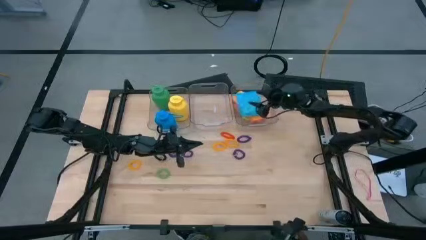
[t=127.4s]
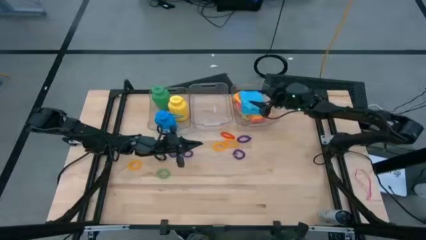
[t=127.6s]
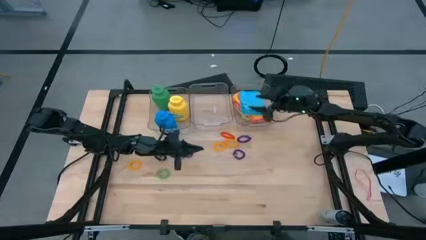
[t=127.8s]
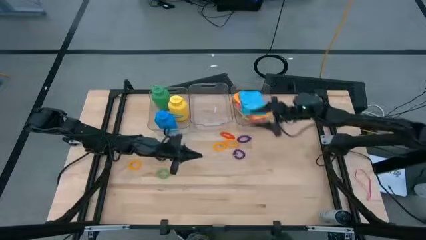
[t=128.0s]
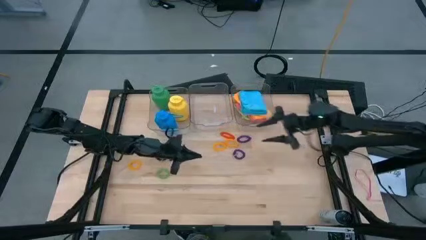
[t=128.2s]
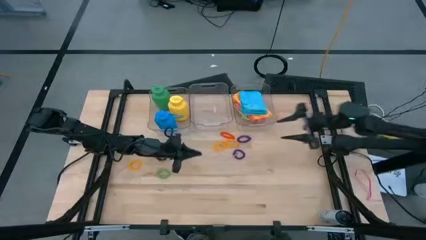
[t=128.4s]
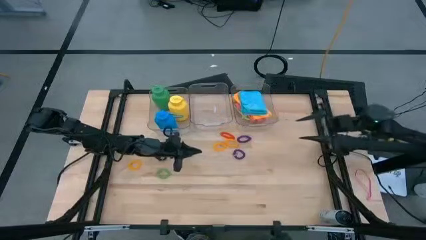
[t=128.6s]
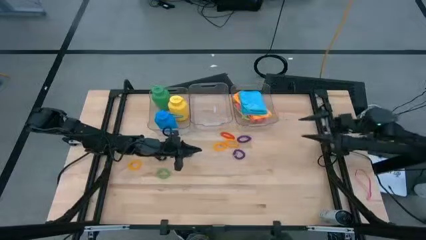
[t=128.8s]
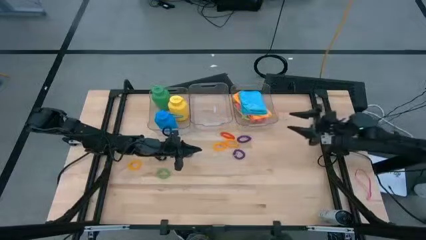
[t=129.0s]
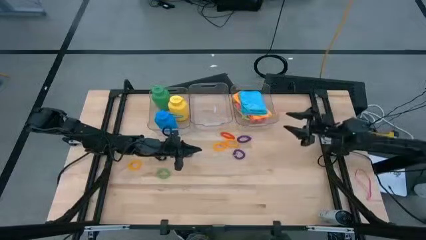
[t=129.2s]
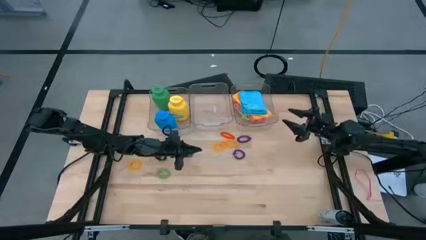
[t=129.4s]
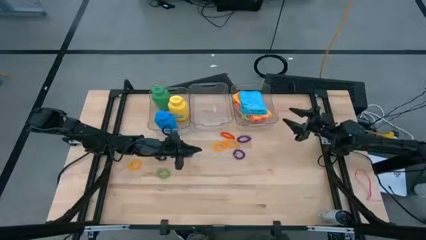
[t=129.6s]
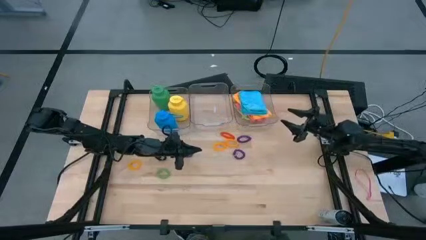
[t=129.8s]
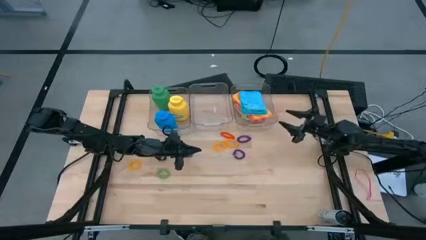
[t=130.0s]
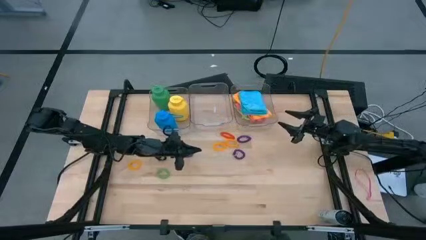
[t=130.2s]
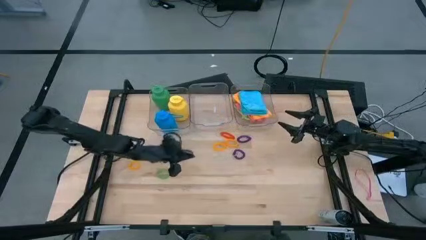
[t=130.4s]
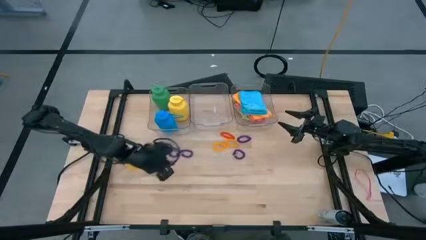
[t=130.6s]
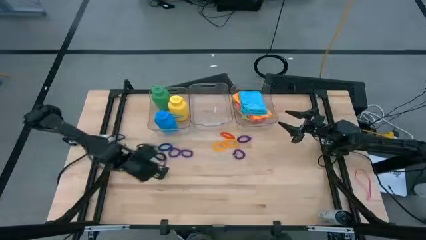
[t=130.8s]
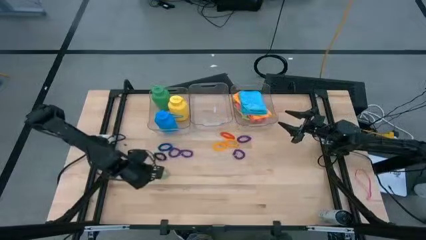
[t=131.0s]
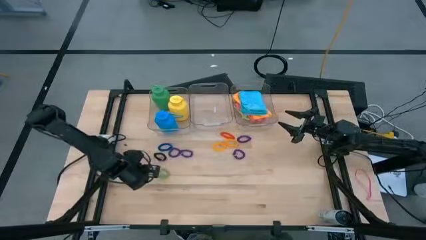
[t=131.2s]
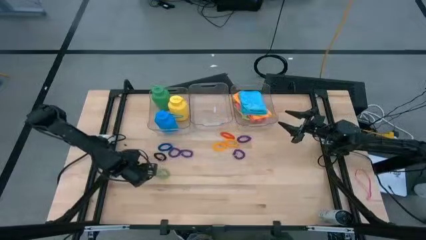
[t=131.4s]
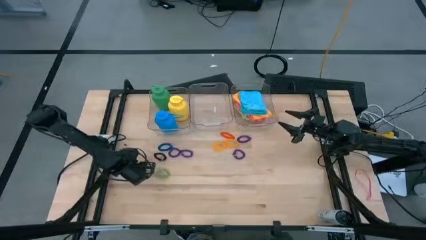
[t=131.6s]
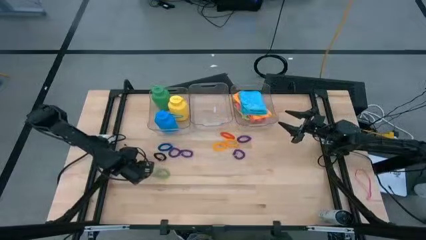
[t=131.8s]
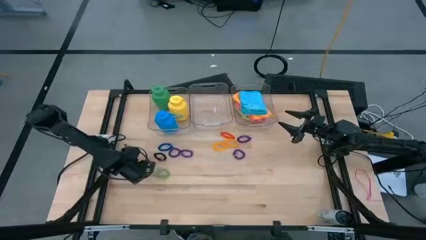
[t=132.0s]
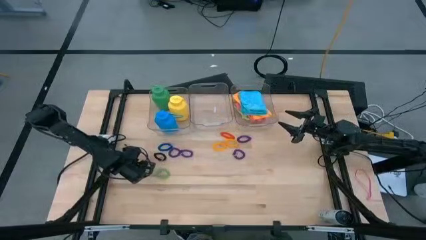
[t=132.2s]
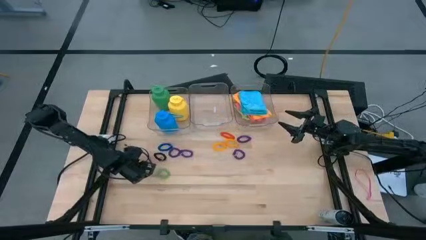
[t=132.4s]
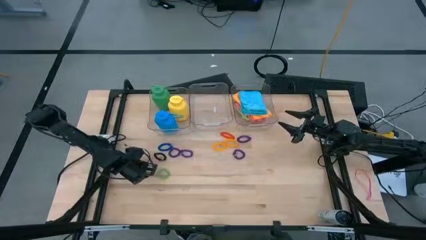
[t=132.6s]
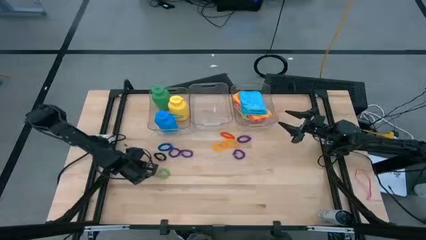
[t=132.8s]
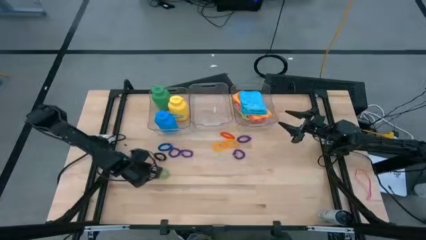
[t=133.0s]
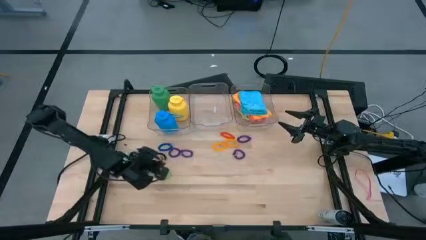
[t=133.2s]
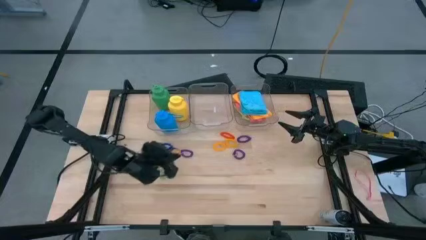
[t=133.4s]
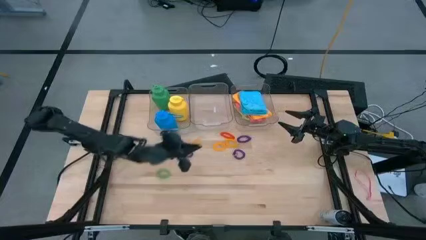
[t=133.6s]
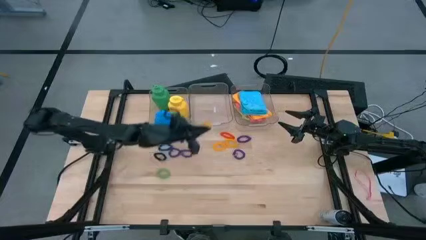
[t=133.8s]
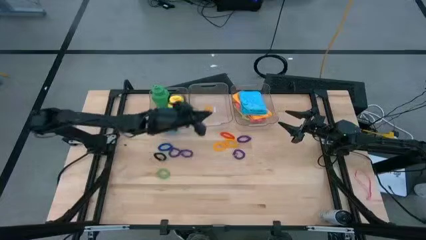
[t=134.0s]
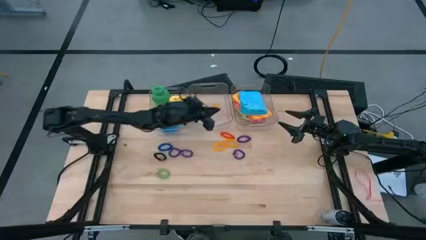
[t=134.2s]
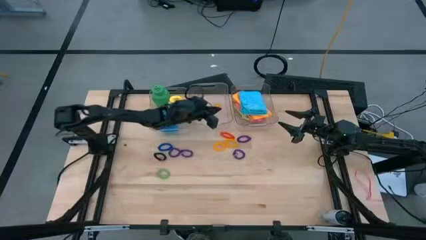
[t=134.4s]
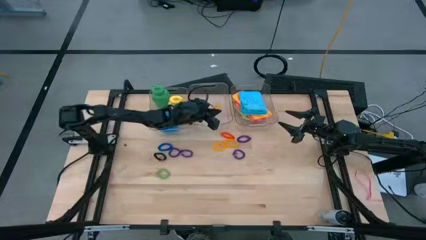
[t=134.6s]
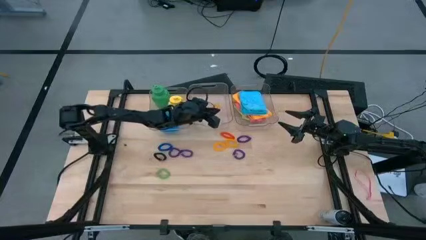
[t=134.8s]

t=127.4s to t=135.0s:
Task: Pick & Place Sports Items
Put the yellow wrist coil into the middle transparent container

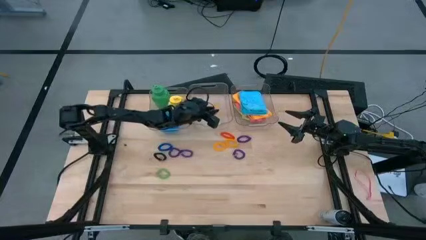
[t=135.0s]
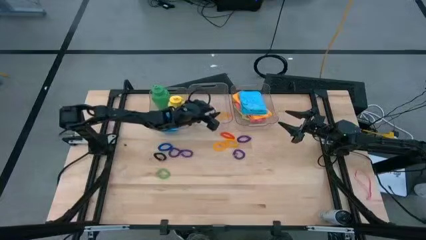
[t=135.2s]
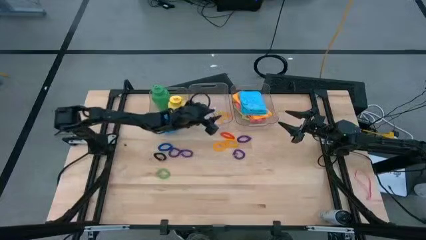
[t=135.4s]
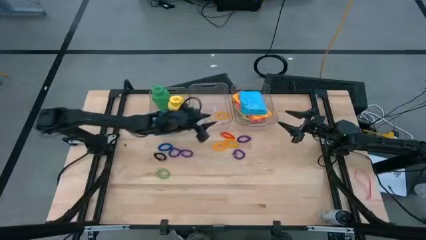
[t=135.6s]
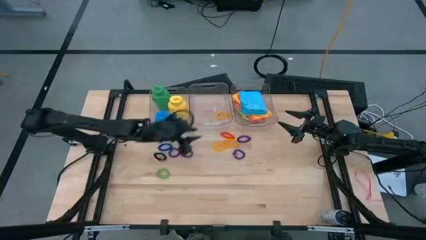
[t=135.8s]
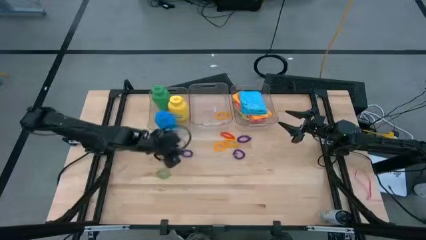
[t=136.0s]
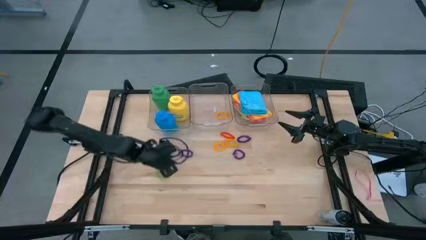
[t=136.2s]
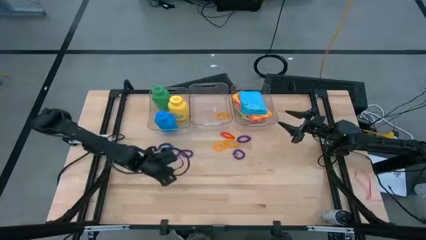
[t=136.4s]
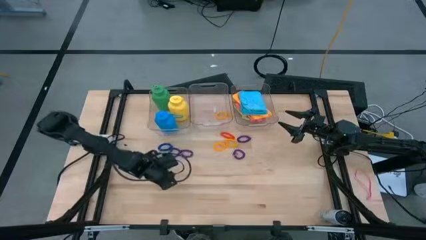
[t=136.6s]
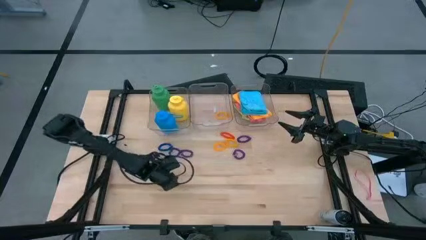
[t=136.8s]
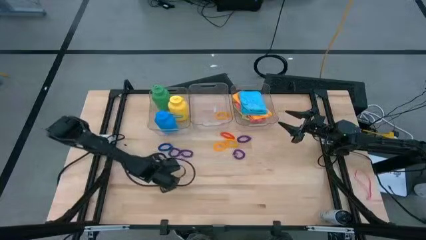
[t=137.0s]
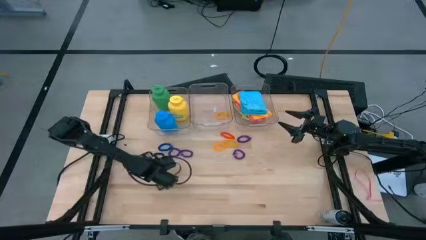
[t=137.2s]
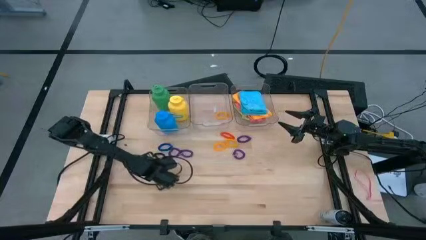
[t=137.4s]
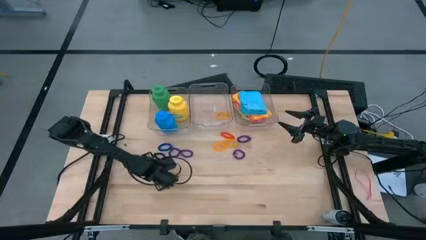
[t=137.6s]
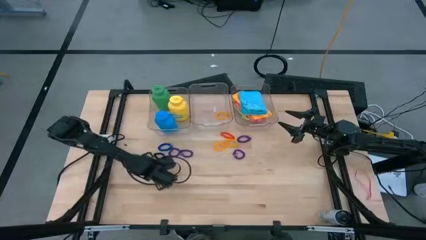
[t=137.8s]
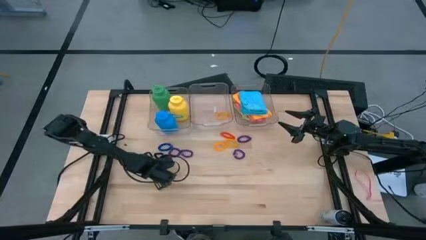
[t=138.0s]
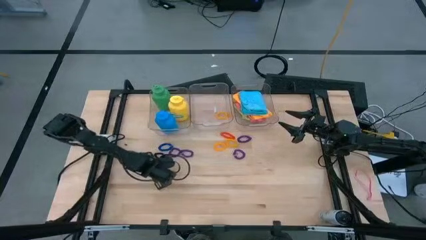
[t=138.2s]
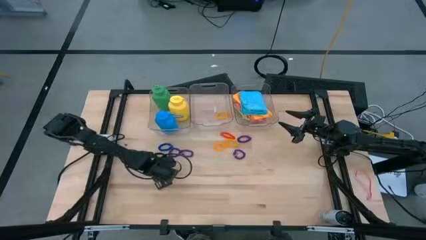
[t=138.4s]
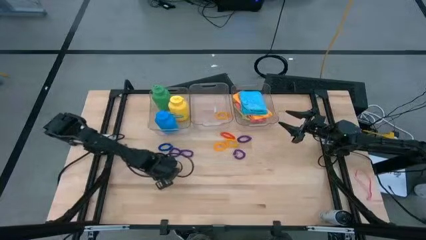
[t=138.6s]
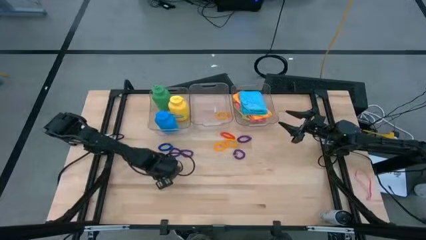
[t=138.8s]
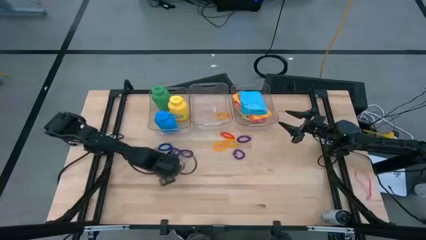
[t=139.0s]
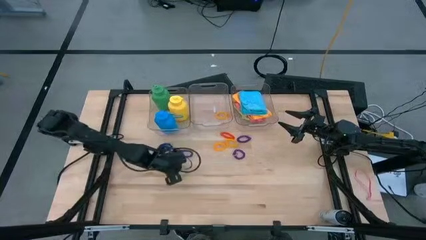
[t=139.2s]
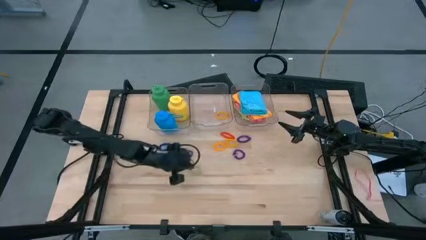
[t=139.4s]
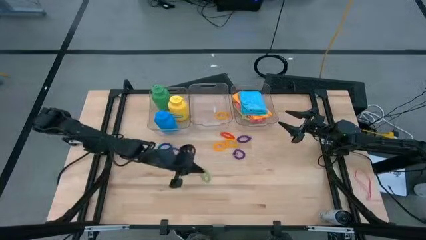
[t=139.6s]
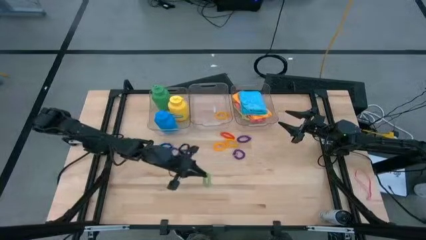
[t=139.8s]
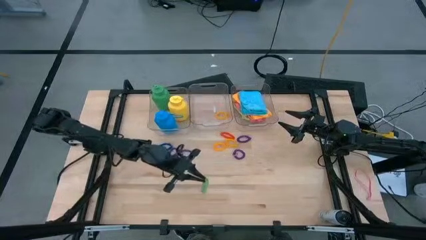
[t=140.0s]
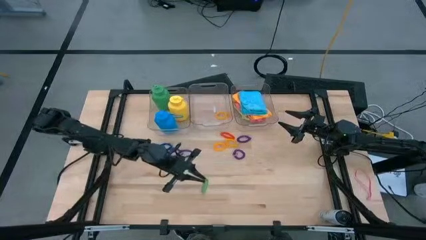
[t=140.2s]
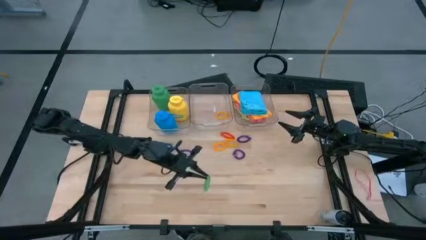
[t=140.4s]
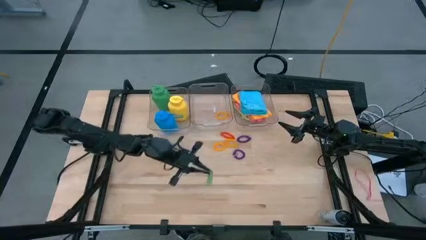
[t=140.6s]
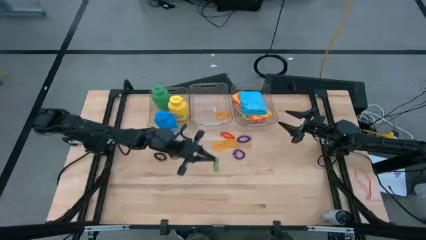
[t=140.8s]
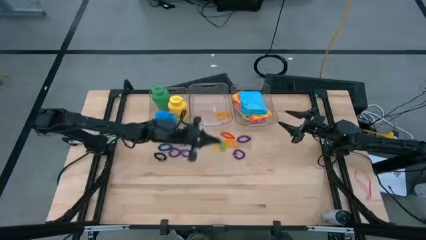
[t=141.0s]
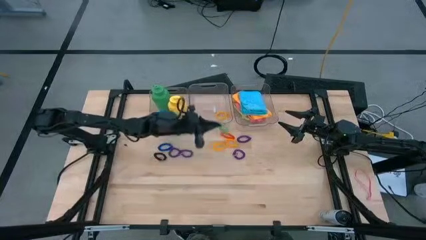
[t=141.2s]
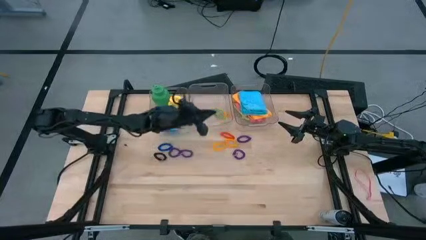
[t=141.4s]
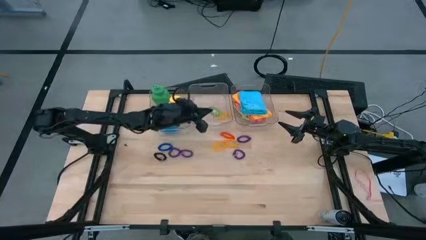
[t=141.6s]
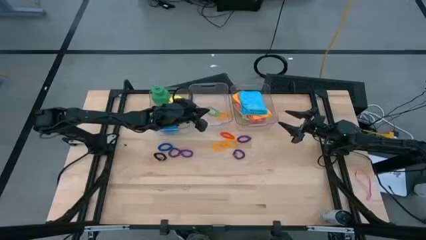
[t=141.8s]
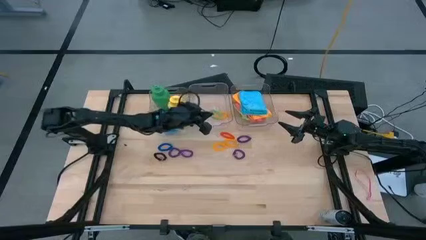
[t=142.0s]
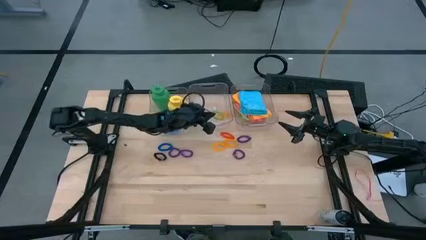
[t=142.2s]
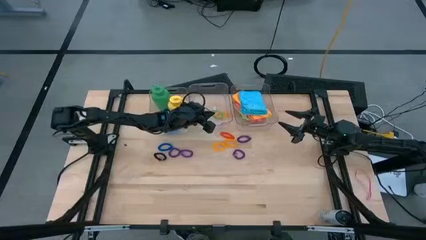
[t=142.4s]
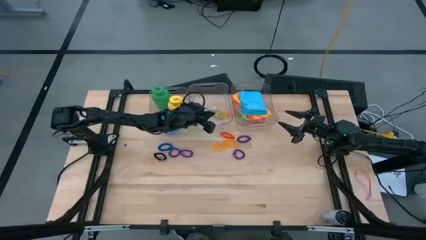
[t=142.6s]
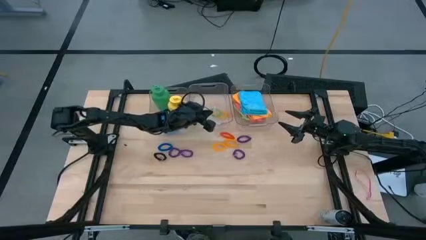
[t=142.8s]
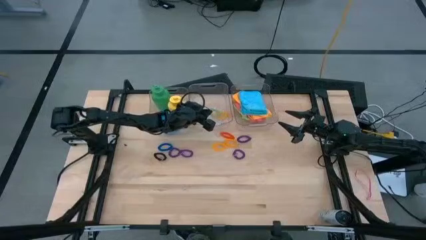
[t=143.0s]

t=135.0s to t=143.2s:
Put the green wrist coil into the middle transparent container
